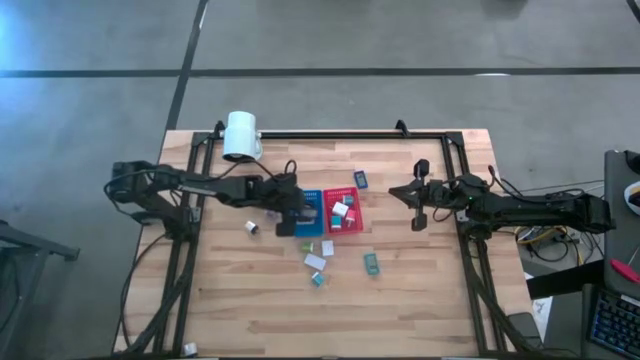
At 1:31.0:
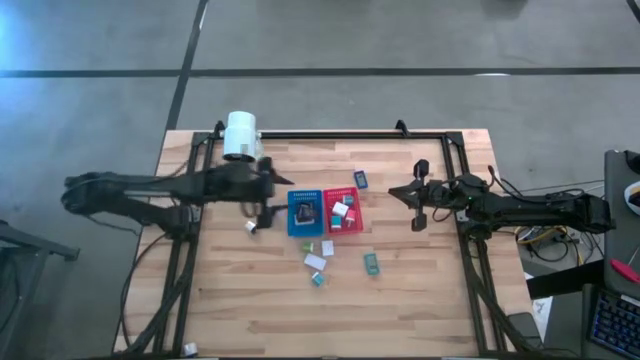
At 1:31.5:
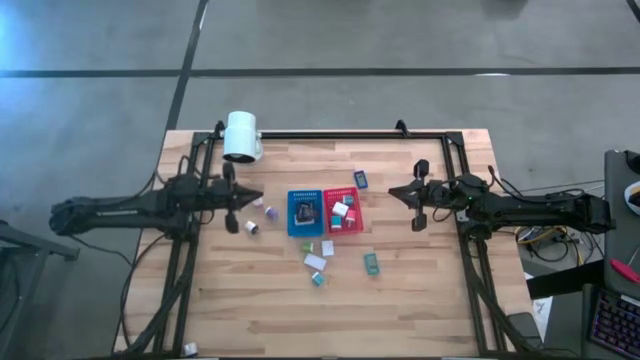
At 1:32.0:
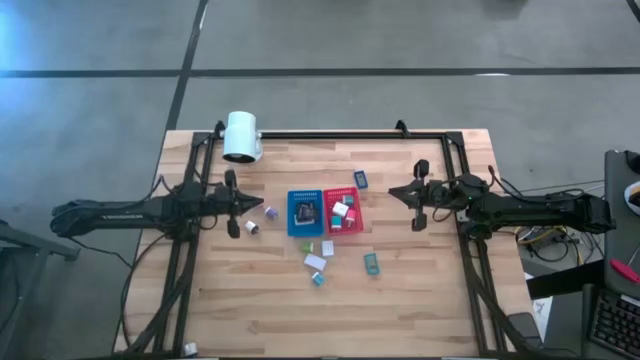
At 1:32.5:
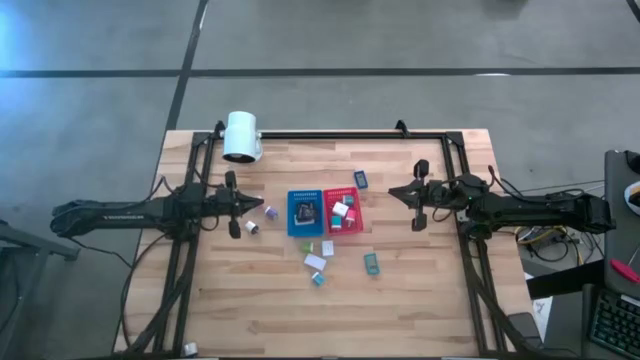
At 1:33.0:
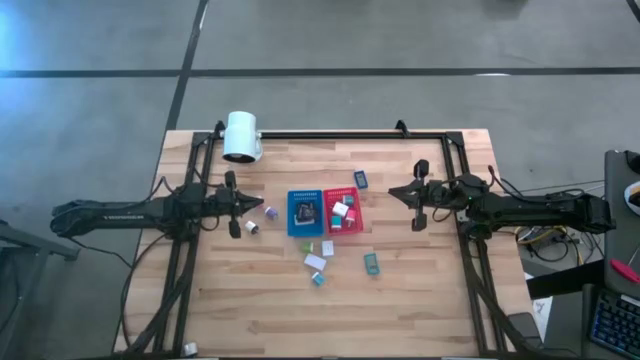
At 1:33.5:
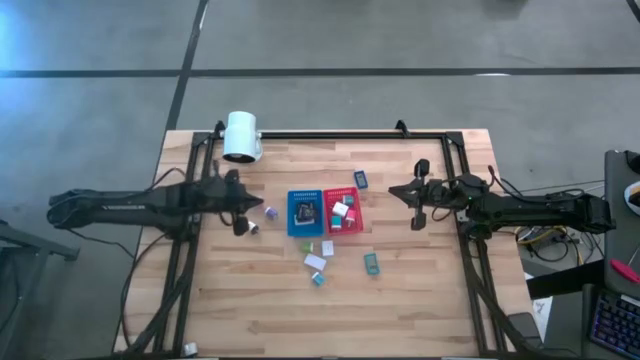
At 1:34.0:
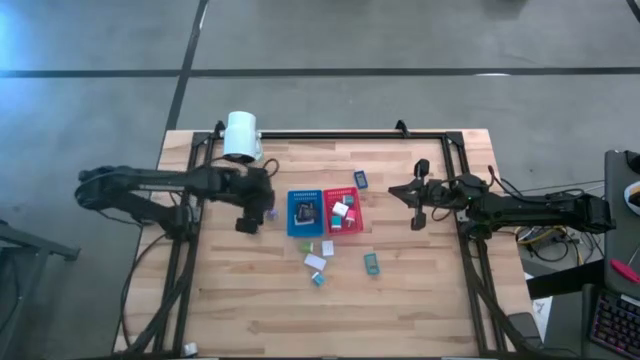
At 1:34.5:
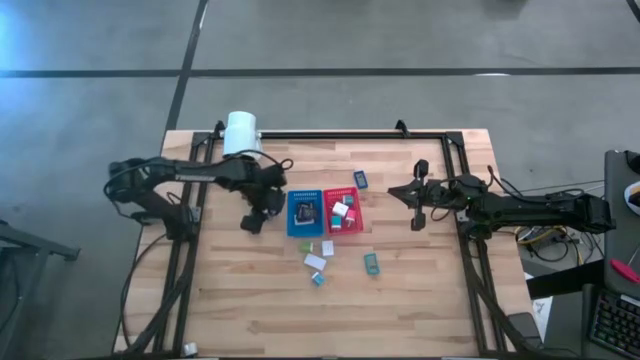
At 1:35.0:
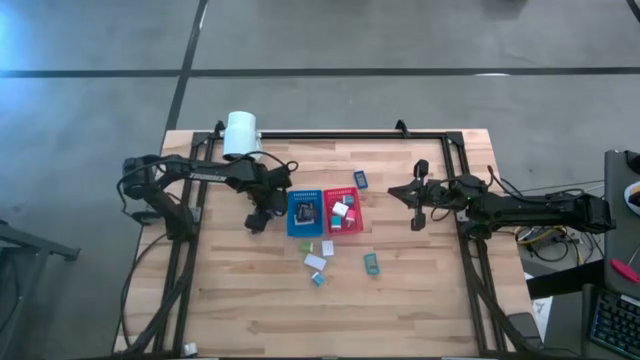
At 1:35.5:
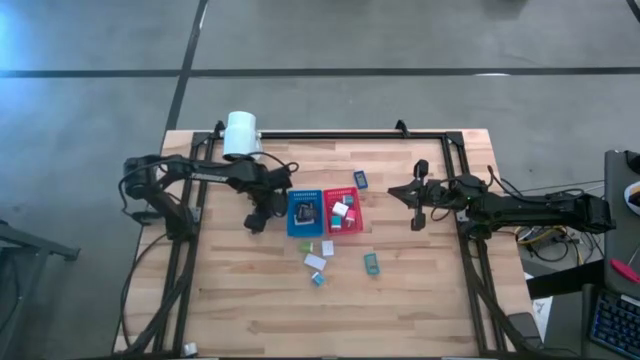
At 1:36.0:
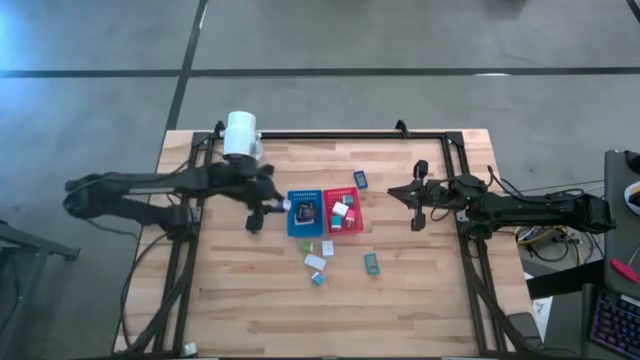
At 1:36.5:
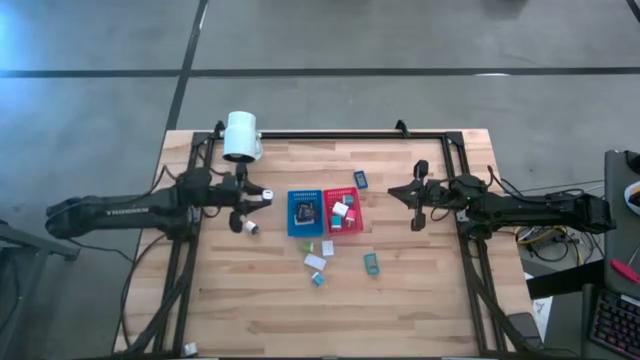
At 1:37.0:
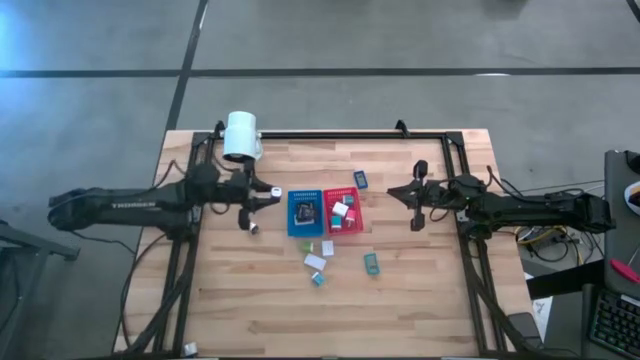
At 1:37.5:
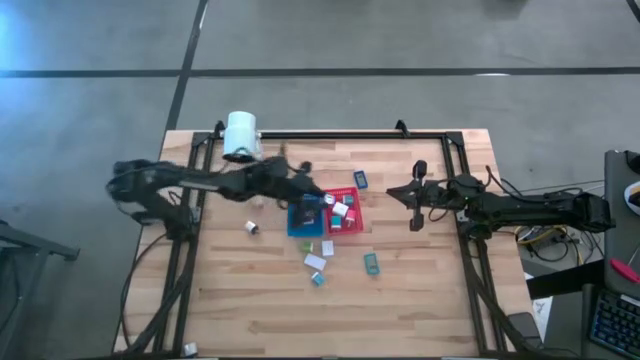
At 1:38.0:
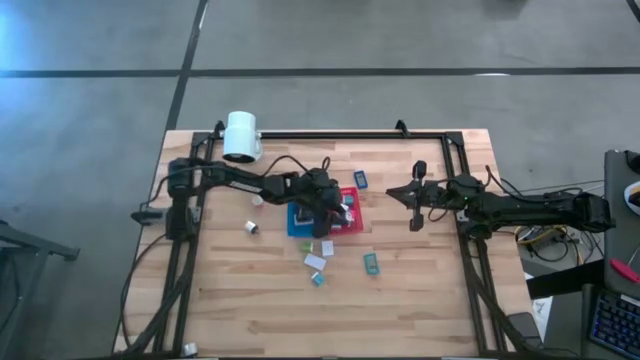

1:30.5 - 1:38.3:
Task: Pick & Place Office items
Put the purple charger adapter into the red bin

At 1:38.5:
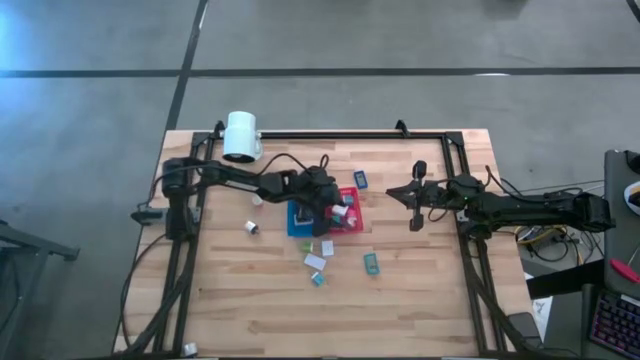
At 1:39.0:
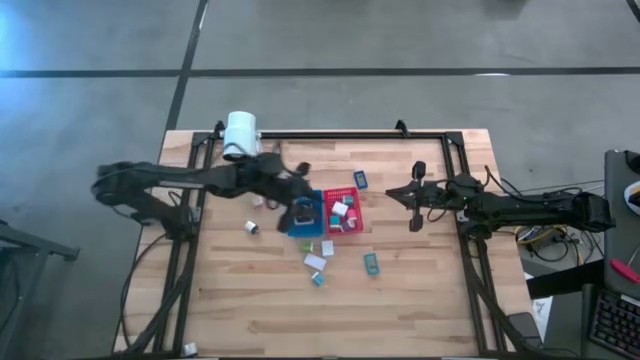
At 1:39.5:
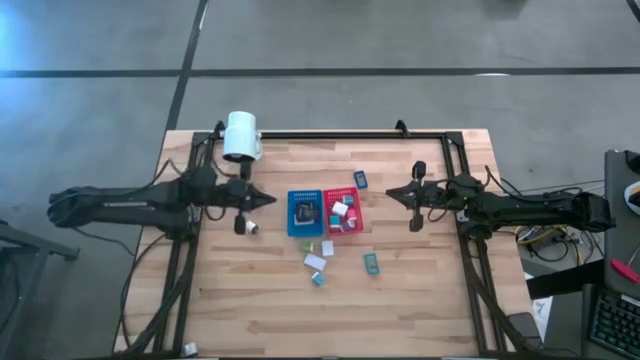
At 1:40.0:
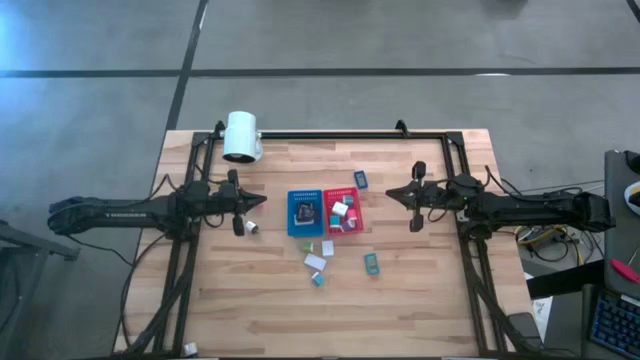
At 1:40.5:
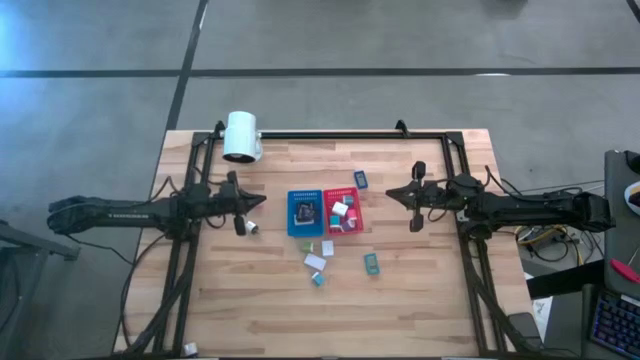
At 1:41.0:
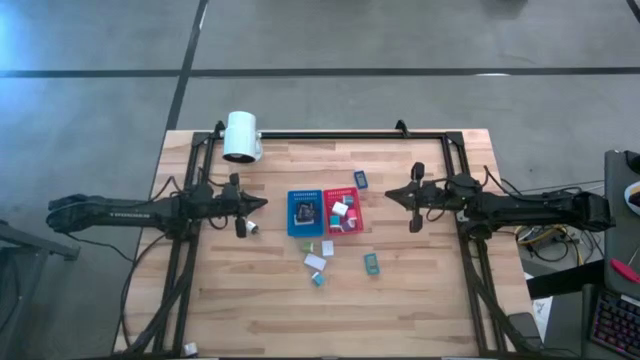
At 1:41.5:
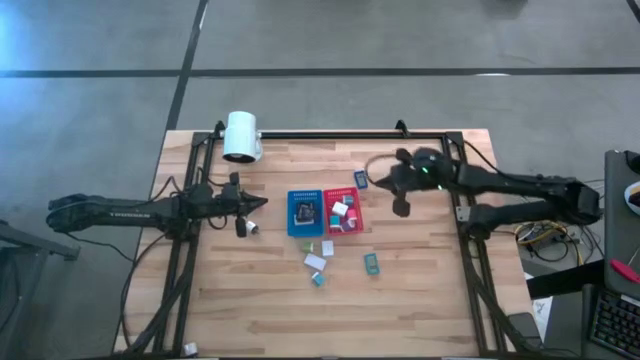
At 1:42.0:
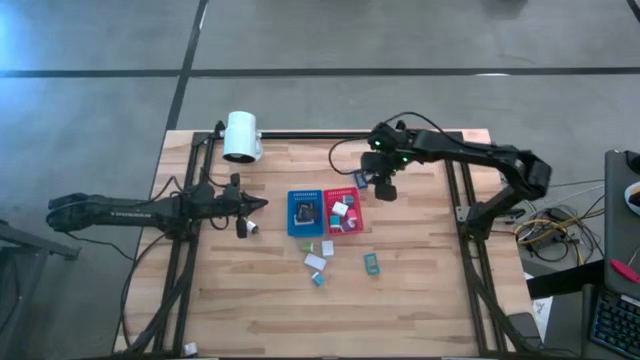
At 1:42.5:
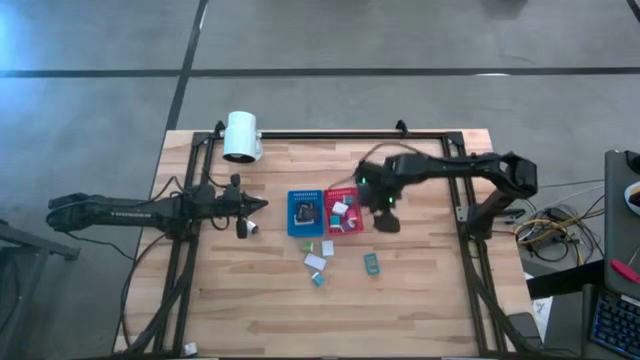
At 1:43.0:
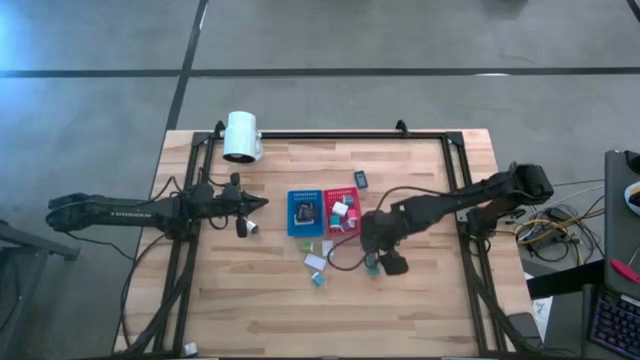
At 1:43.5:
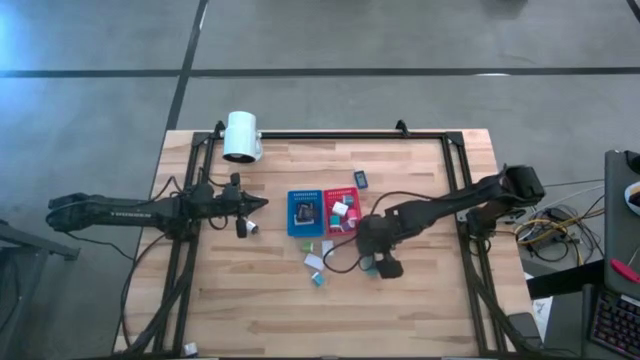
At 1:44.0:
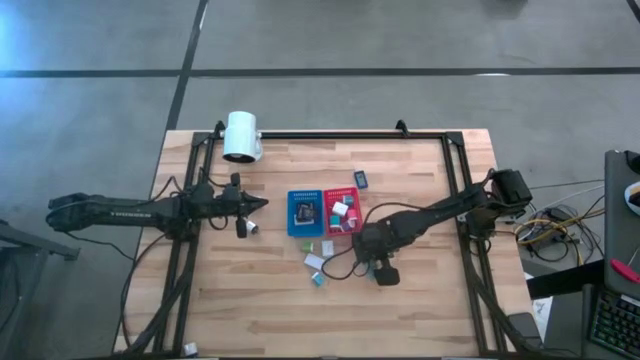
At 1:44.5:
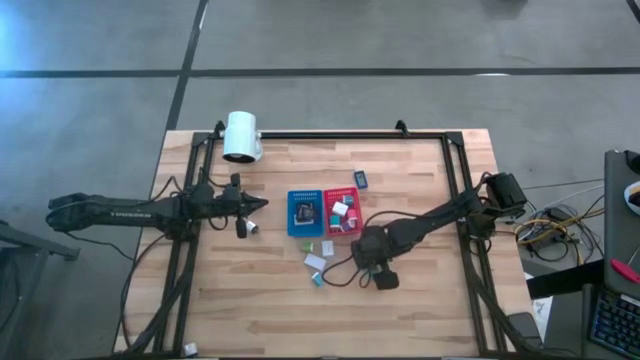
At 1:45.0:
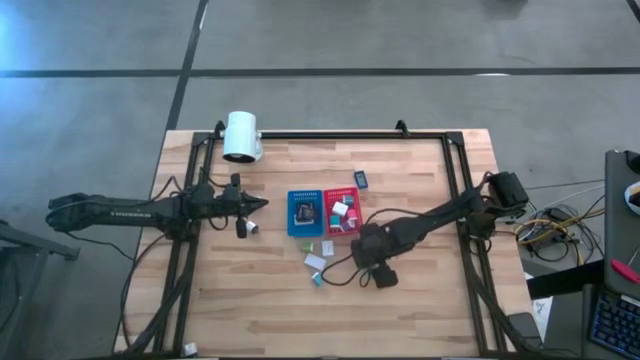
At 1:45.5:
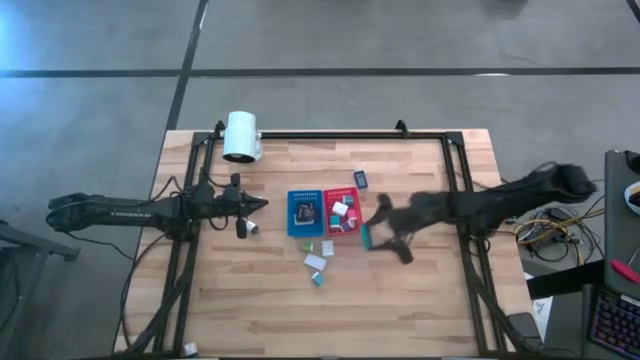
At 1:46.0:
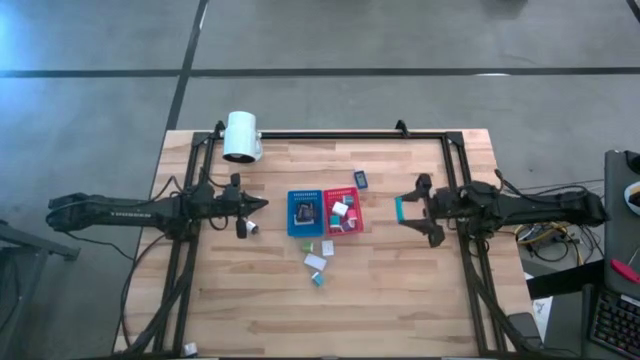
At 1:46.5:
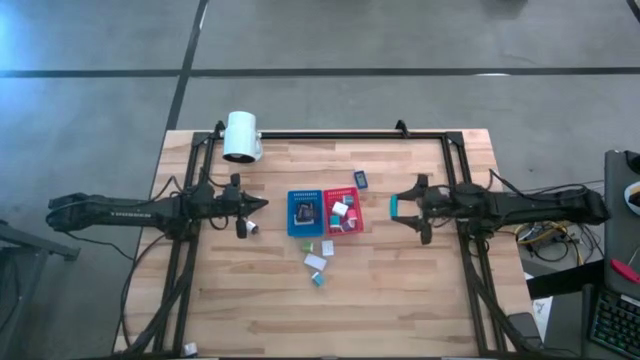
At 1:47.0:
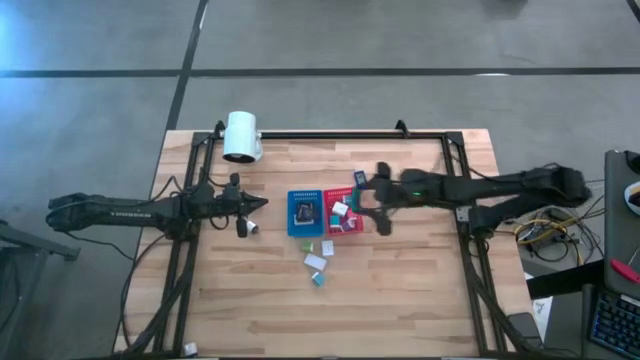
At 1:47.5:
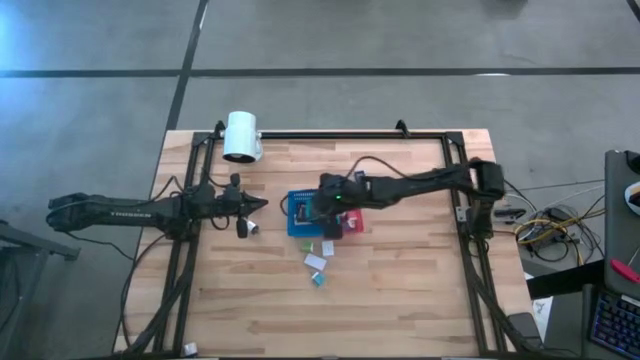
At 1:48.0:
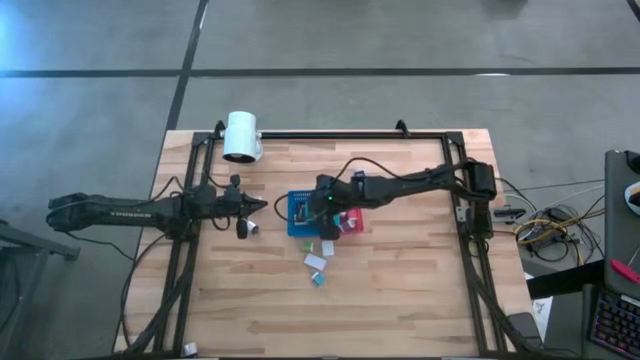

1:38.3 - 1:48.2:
Put the light blue digital timer into the blue bin

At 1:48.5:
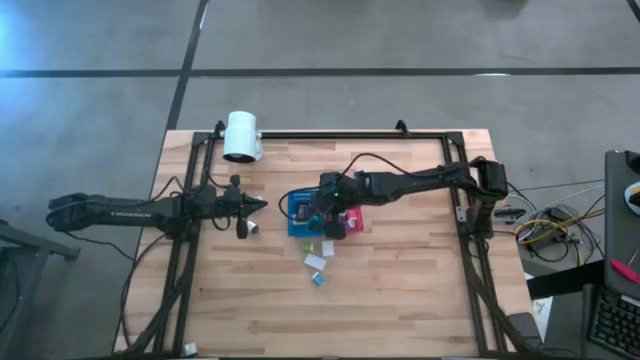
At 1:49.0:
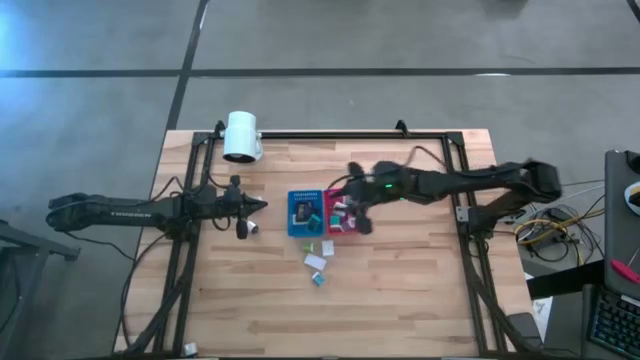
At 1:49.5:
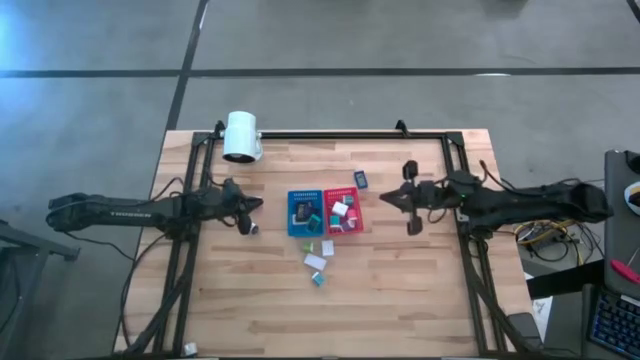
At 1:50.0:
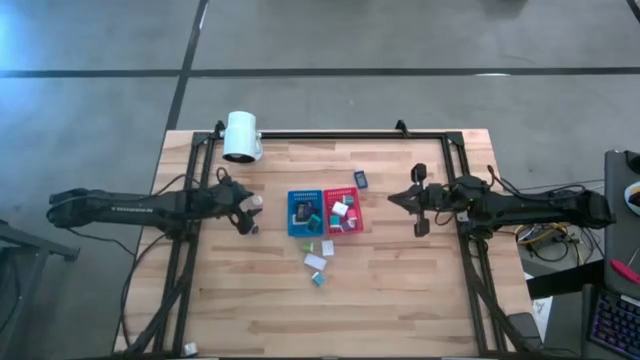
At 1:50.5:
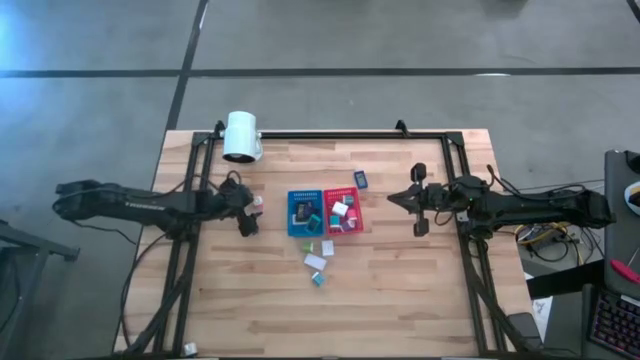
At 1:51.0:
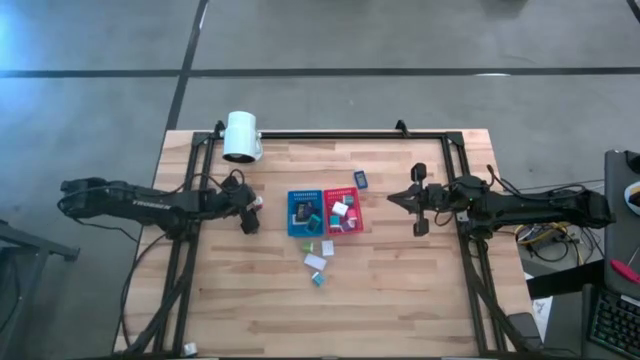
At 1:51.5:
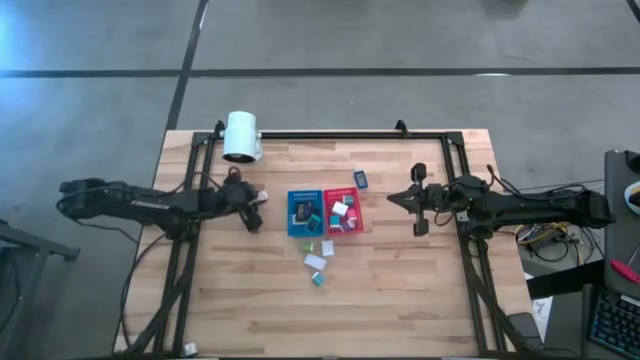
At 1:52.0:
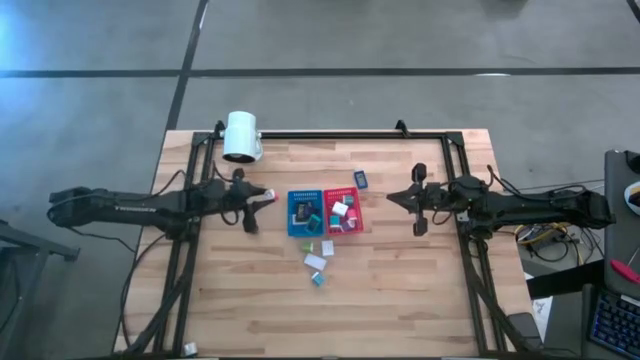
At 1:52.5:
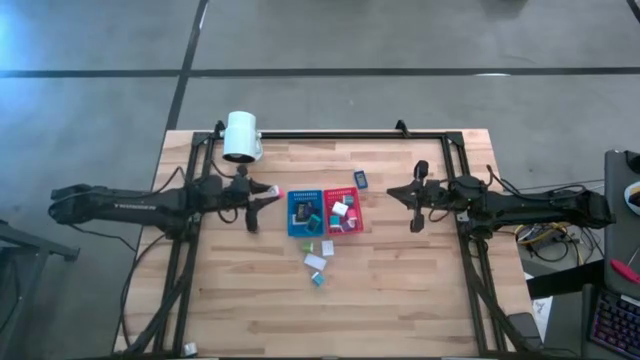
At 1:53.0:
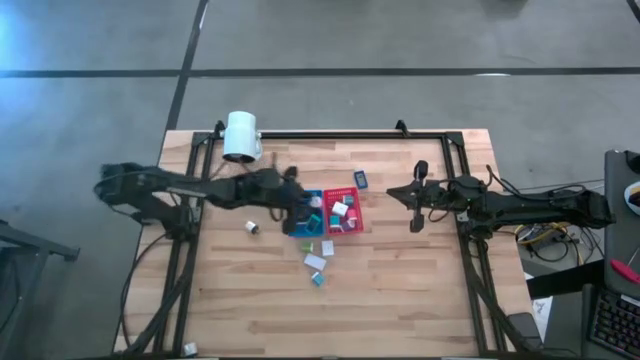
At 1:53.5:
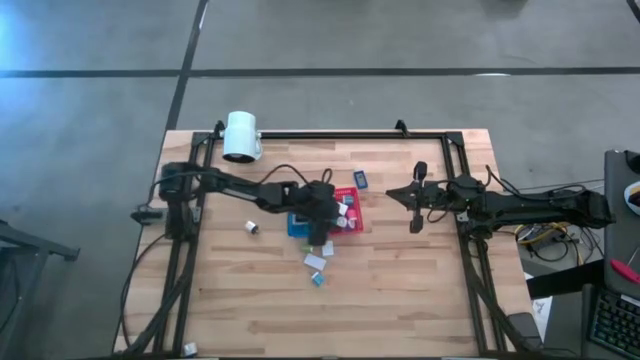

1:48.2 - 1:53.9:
Put the pink charger adapter into the red bin
